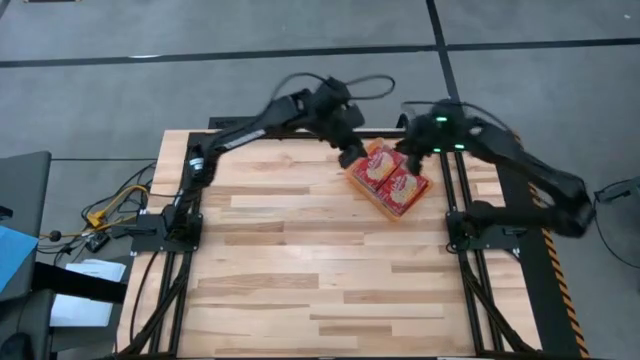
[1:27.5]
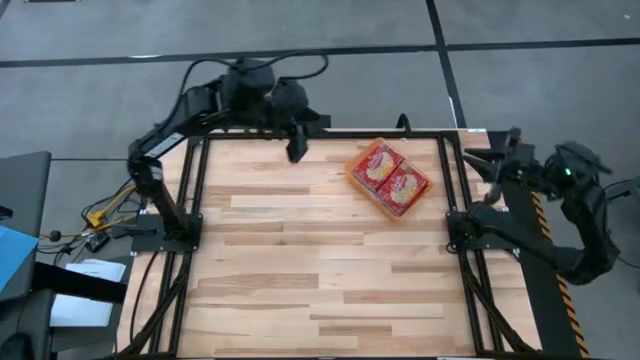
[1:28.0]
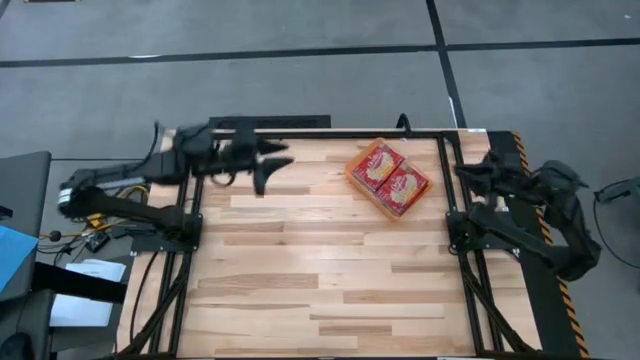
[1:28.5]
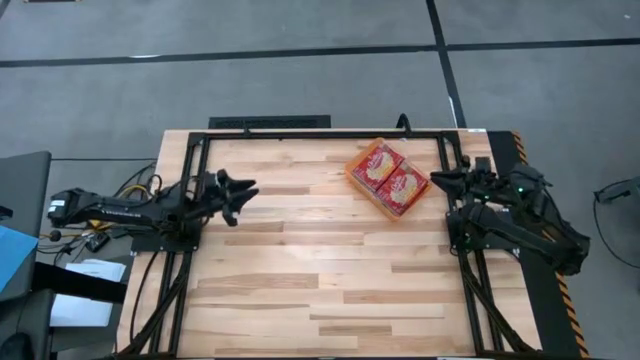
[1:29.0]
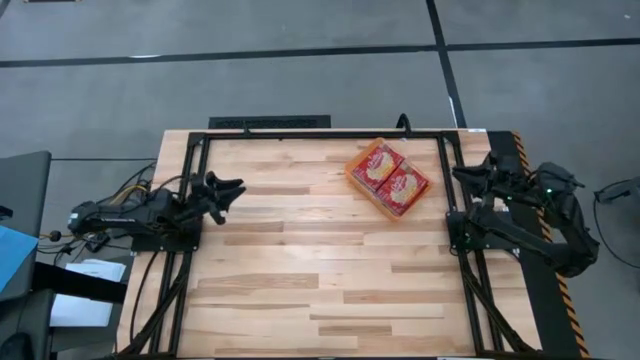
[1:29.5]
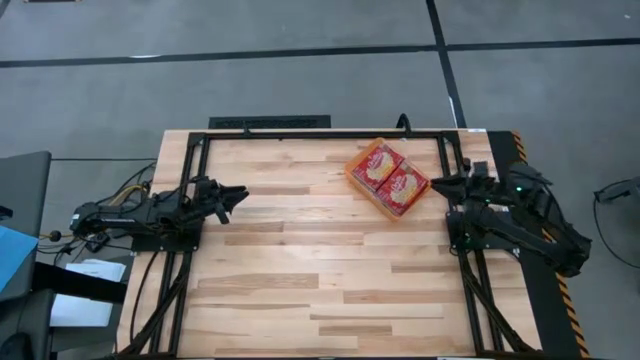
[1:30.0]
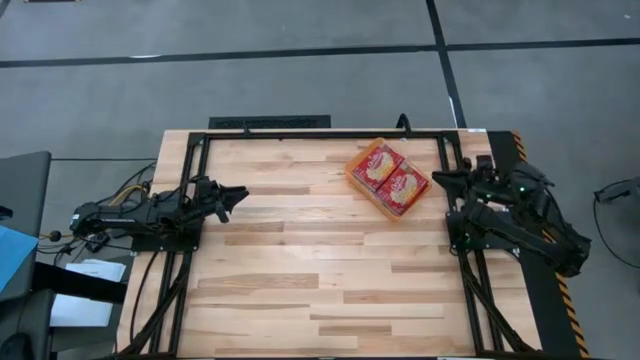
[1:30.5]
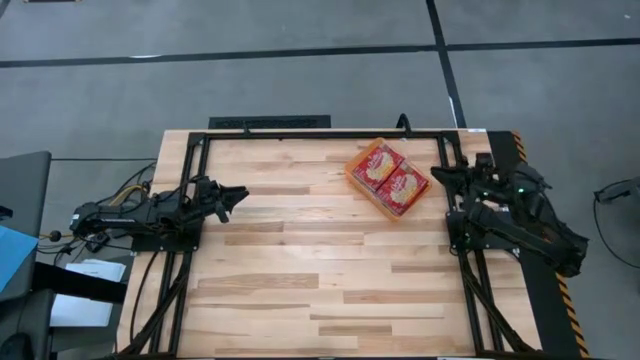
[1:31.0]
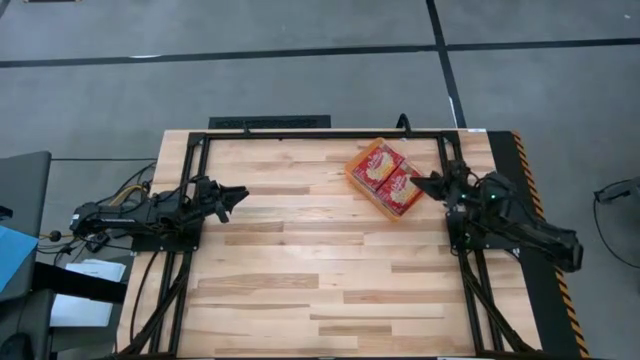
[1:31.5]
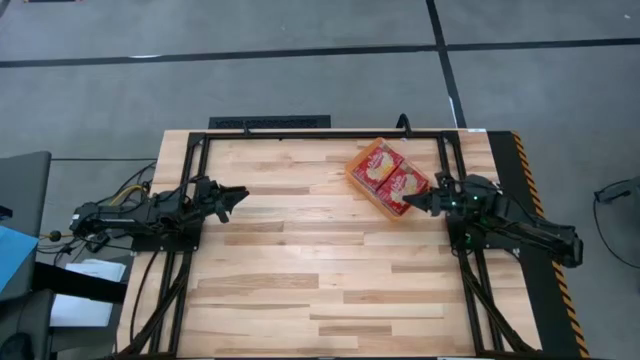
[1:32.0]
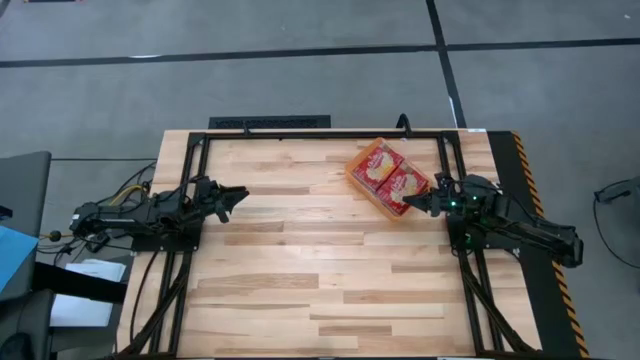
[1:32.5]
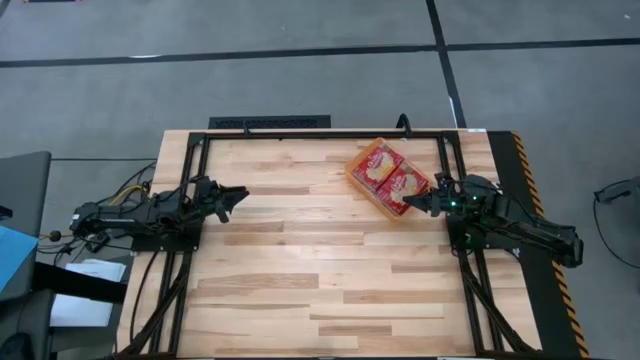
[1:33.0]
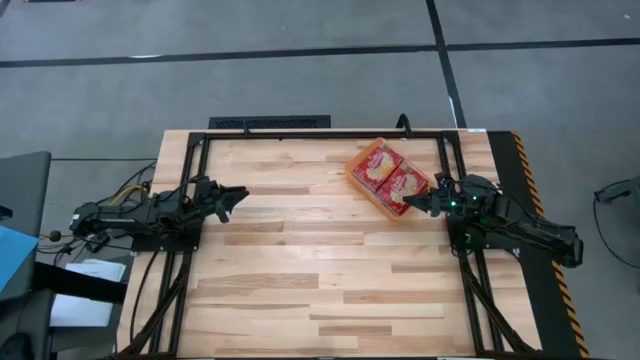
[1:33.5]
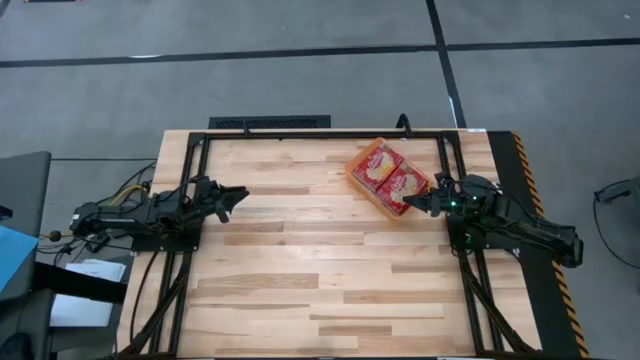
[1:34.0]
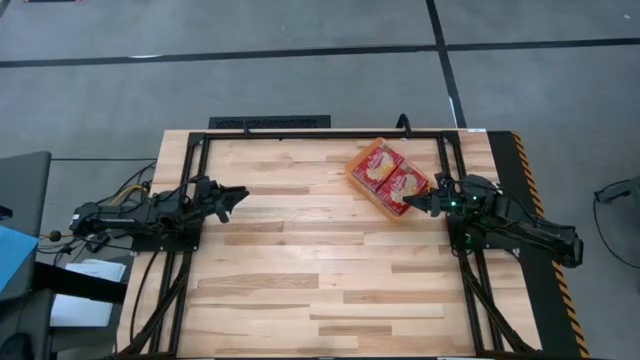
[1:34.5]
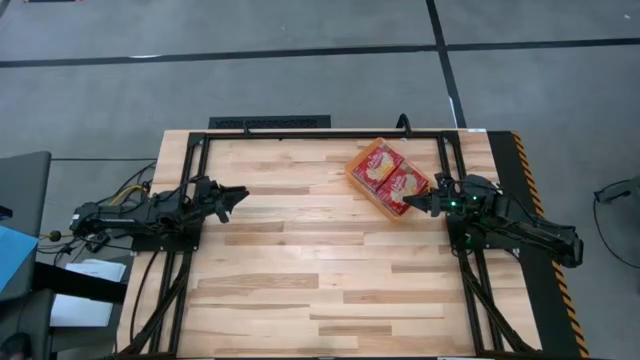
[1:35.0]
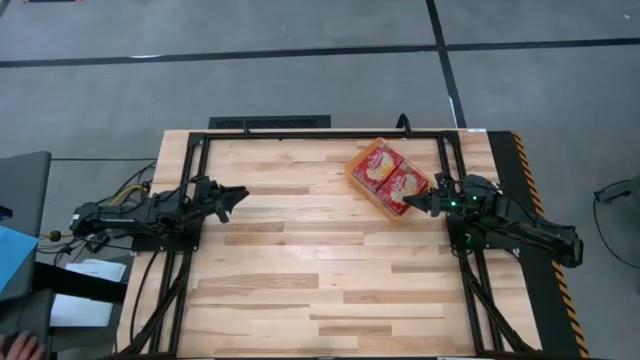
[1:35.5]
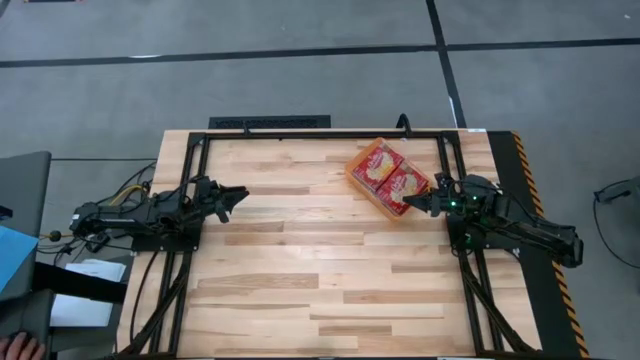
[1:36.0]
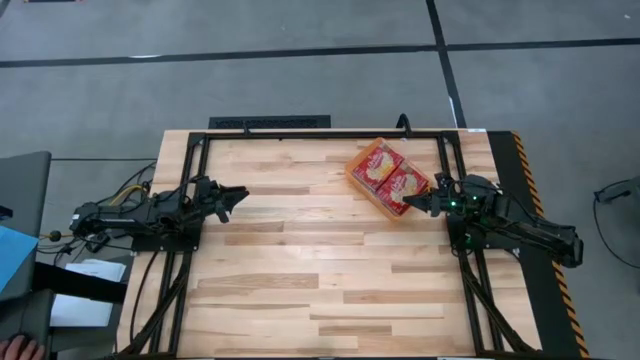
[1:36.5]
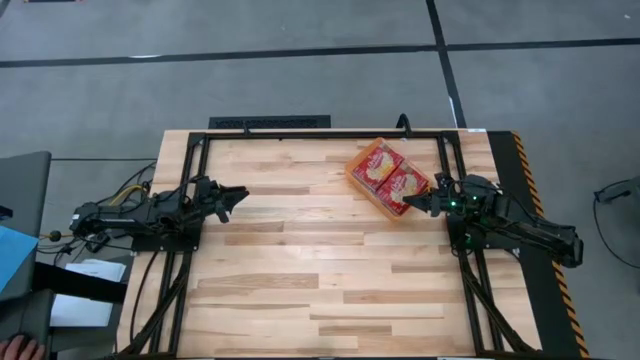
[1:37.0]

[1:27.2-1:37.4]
Task: Sort popcorn bags into baskets
Return to Home Position

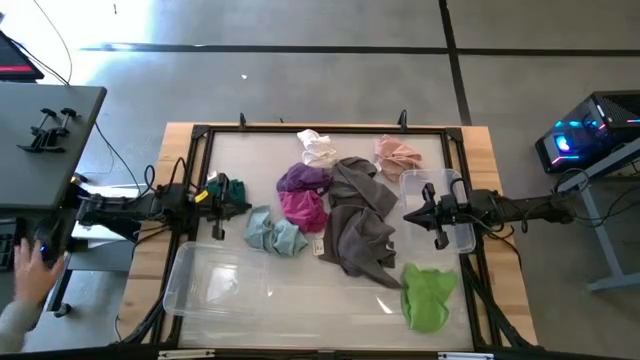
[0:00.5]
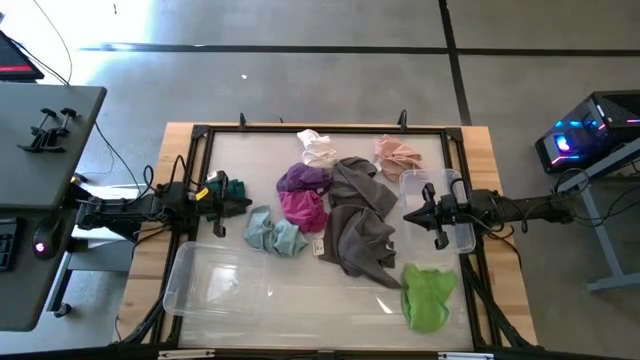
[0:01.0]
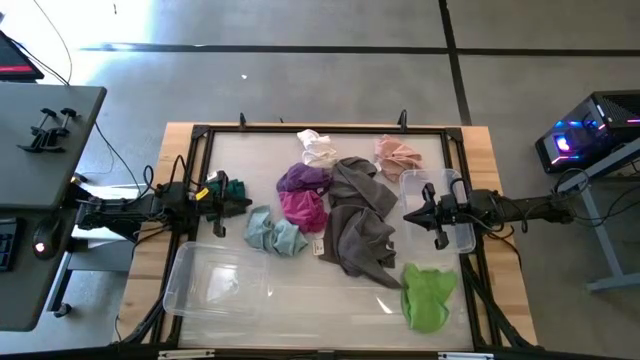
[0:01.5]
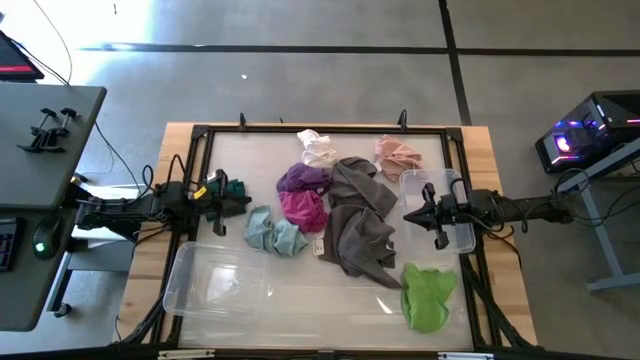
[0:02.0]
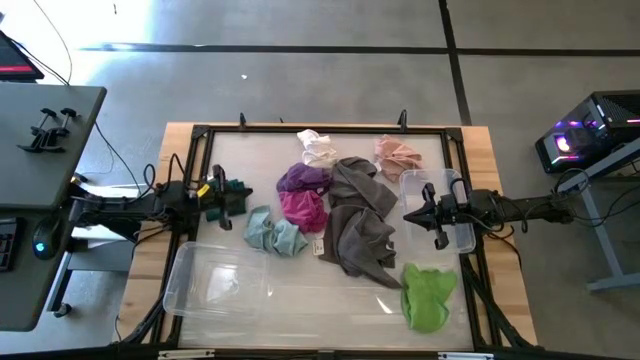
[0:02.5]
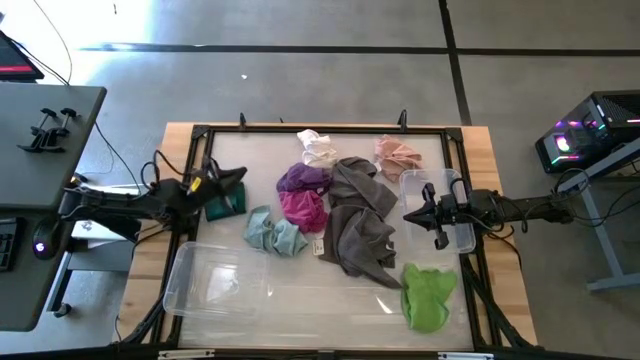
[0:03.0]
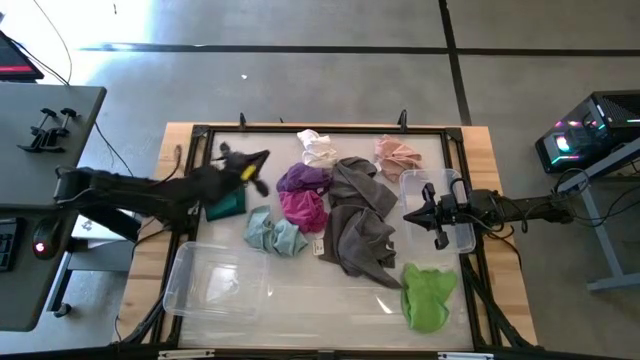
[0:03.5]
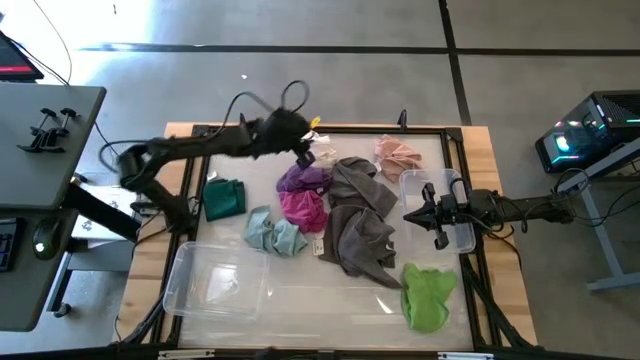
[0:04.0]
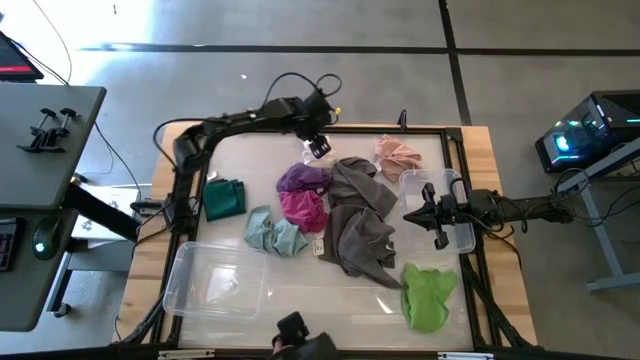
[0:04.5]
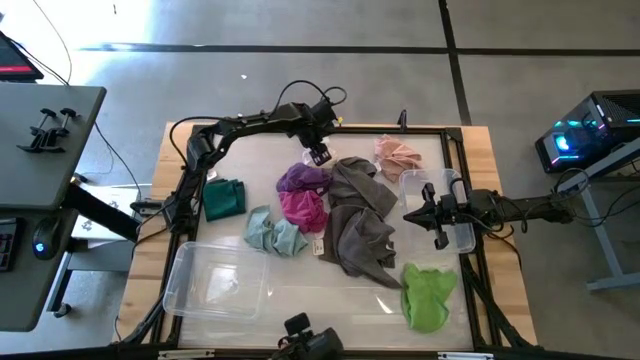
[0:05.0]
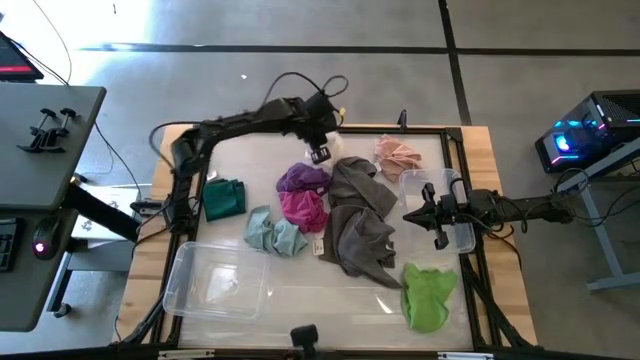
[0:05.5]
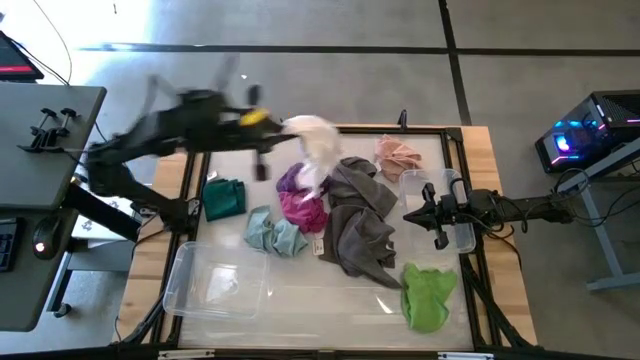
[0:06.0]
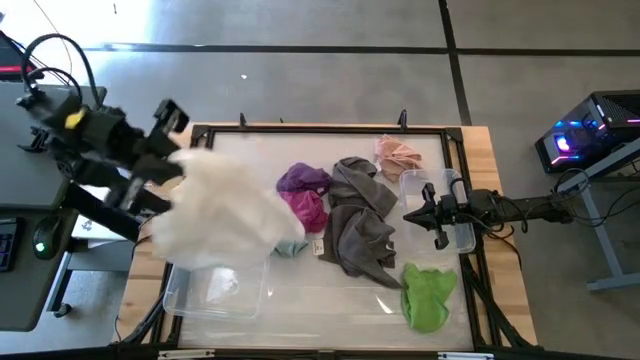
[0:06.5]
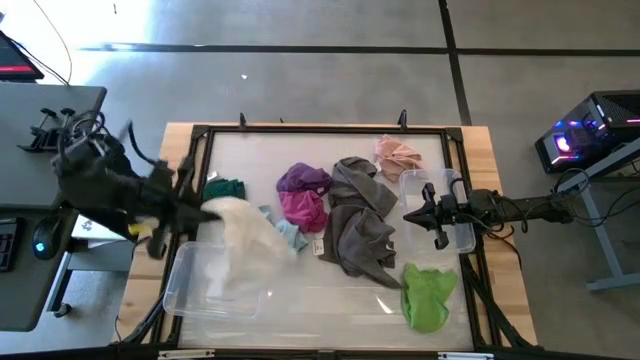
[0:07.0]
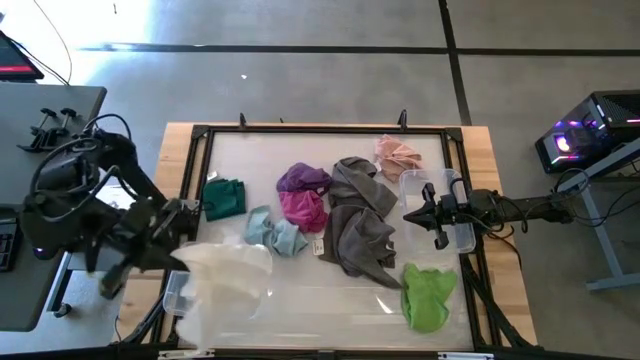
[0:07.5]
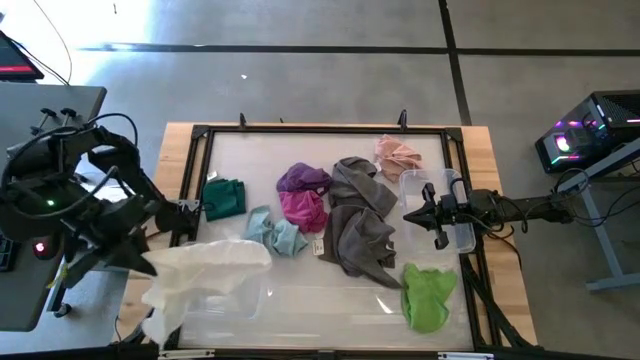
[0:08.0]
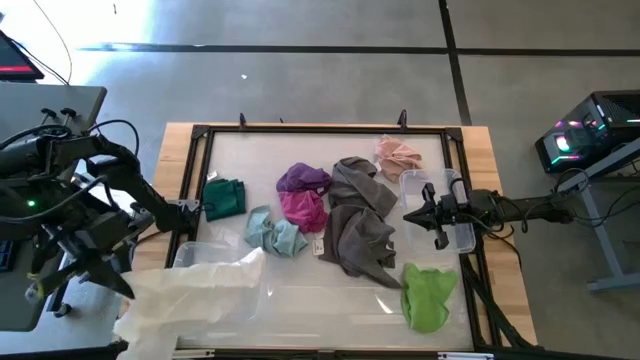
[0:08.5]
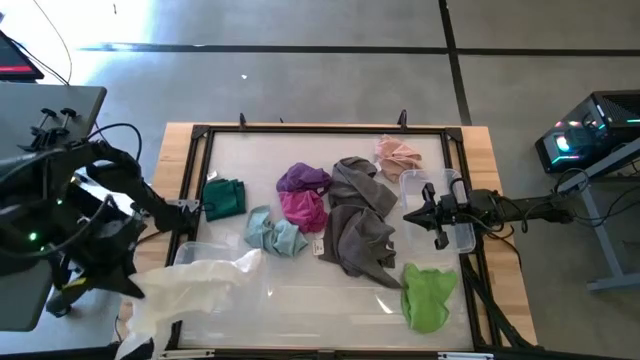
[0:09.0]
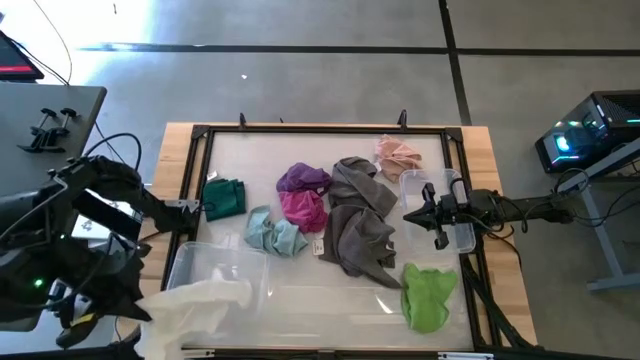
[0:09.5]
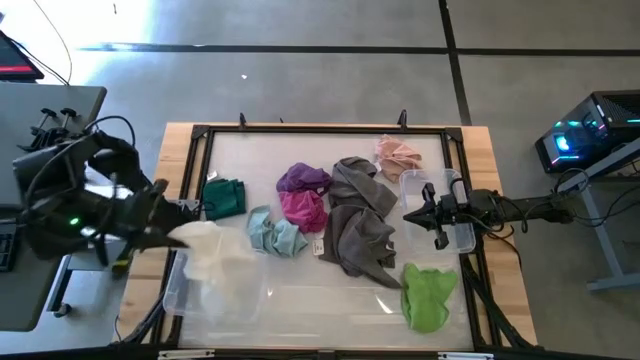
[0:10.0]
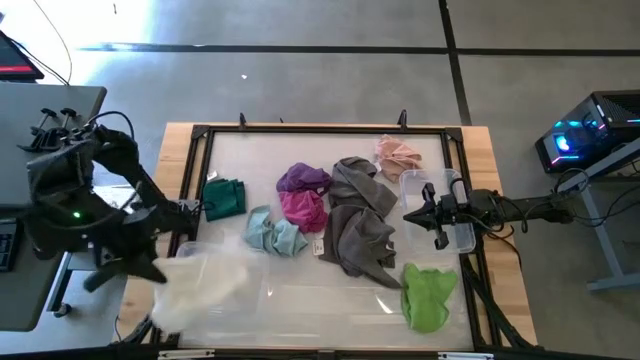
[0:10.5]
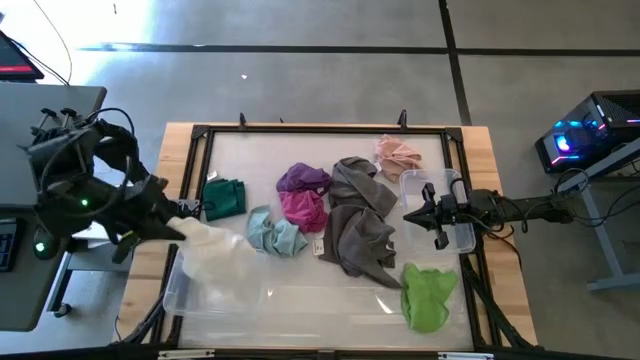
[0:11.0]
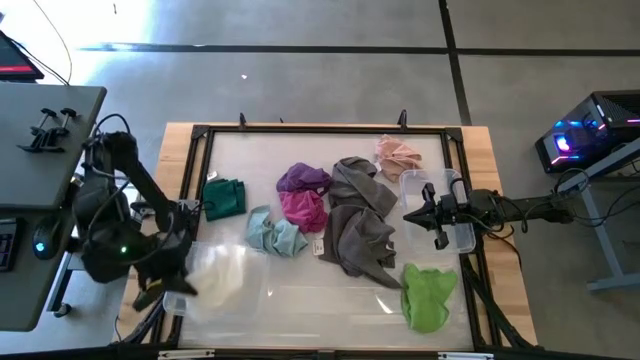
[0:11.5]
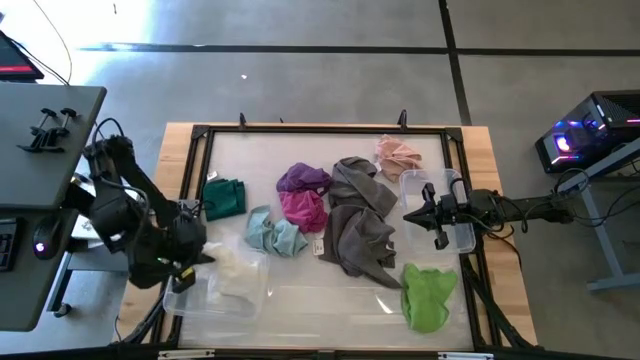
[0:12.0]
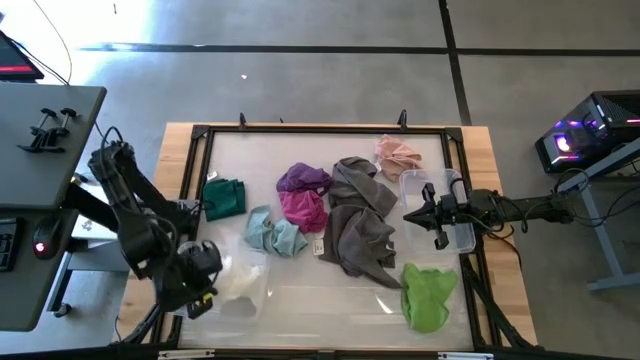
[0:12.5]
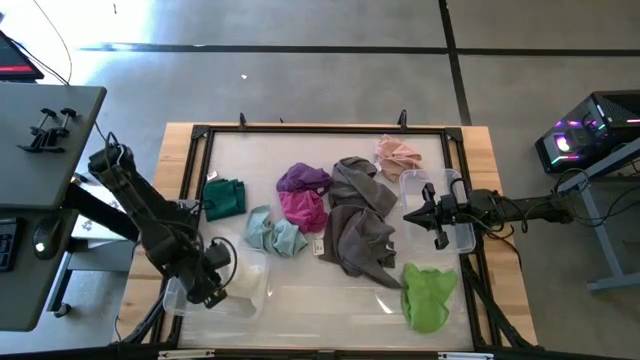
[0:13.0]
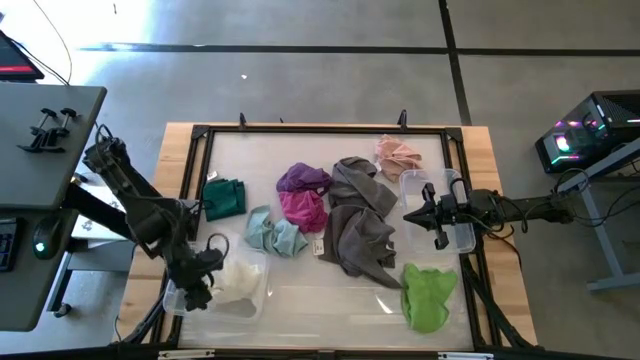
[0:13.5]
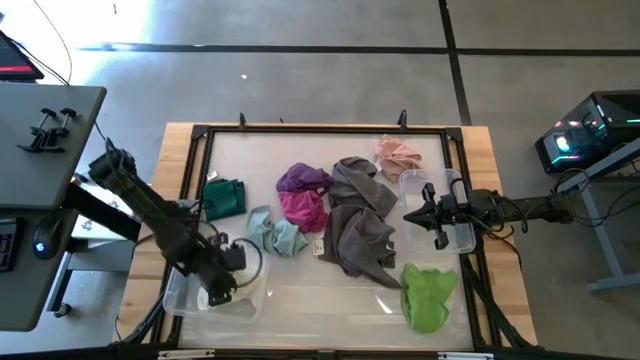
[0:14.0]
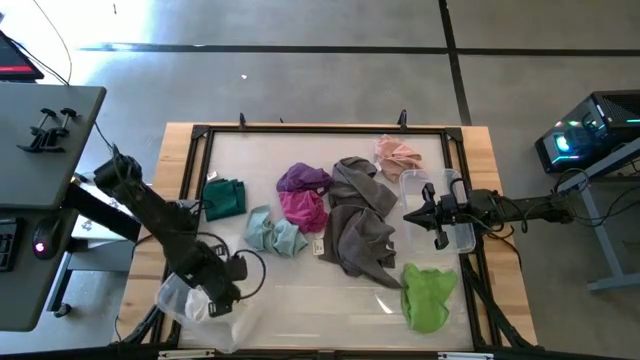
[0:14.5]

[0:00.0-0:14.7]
Task: Sort microfiber towel by color & place in baskets
Put the white microfiber towel into the bottom transparent bin
